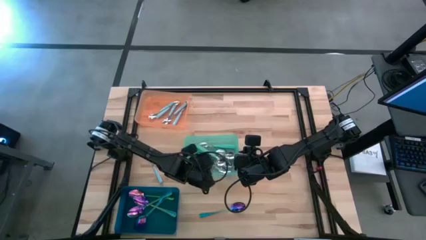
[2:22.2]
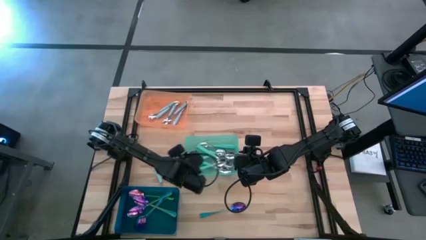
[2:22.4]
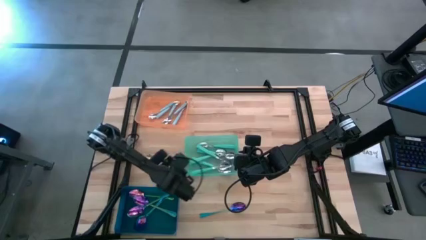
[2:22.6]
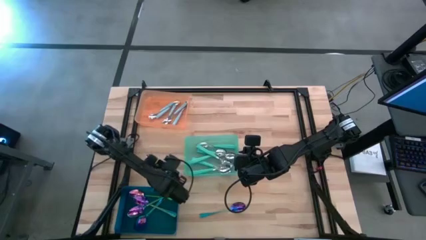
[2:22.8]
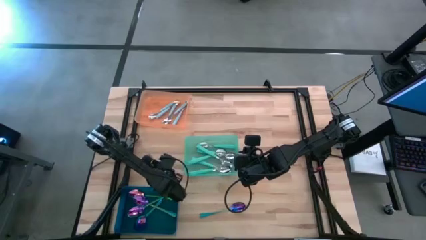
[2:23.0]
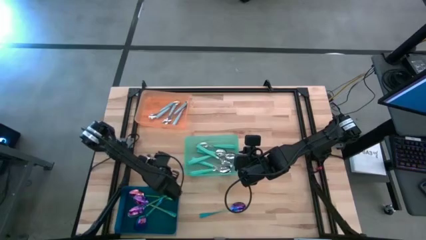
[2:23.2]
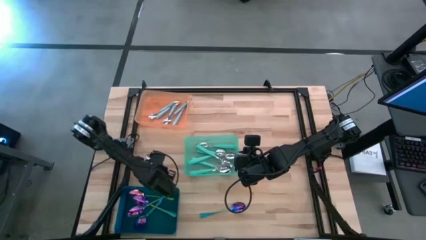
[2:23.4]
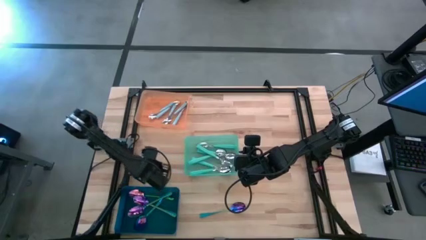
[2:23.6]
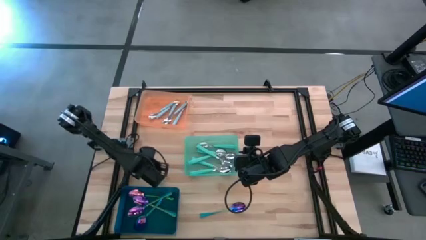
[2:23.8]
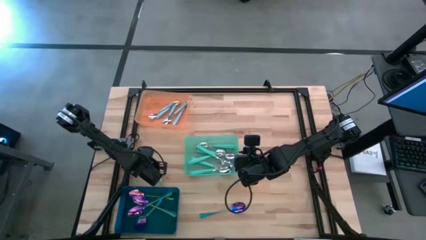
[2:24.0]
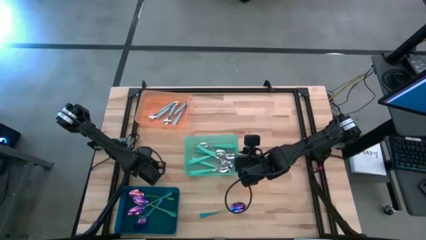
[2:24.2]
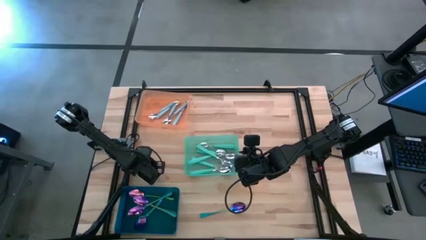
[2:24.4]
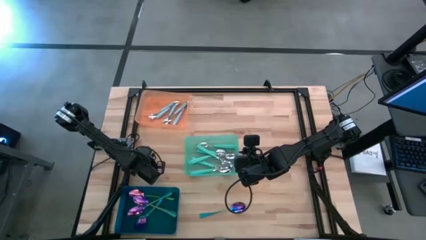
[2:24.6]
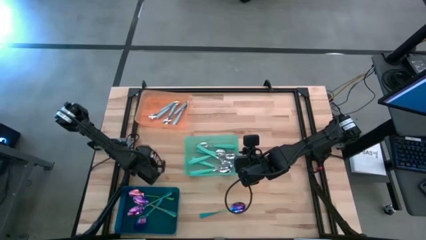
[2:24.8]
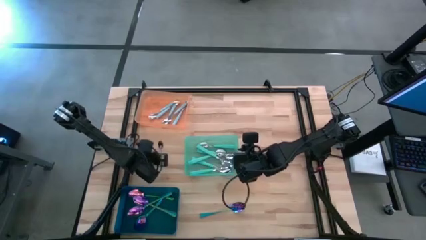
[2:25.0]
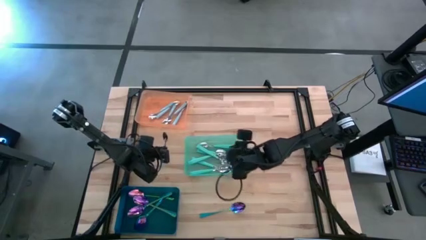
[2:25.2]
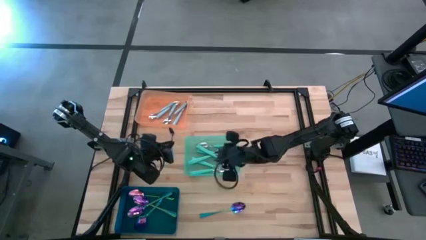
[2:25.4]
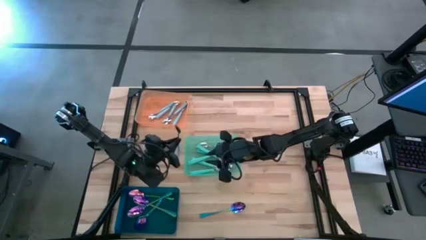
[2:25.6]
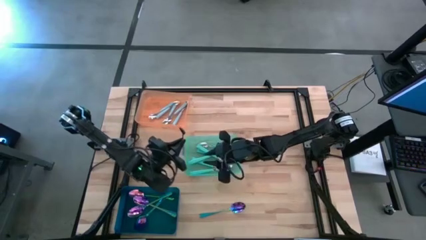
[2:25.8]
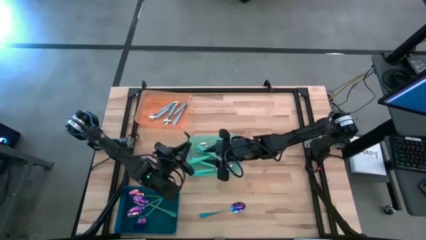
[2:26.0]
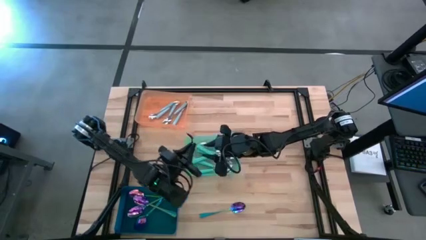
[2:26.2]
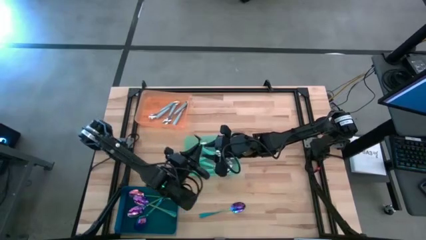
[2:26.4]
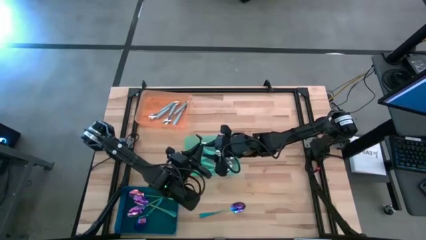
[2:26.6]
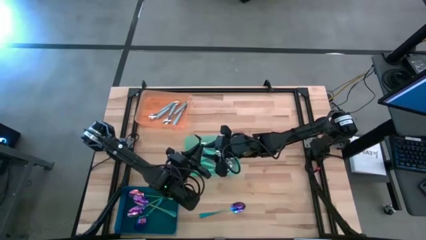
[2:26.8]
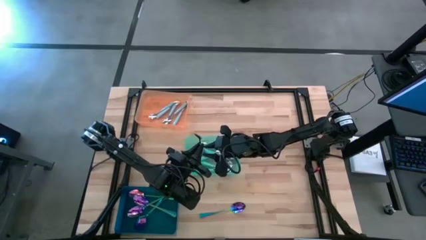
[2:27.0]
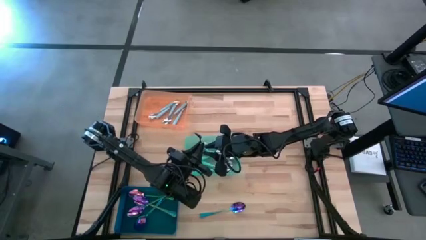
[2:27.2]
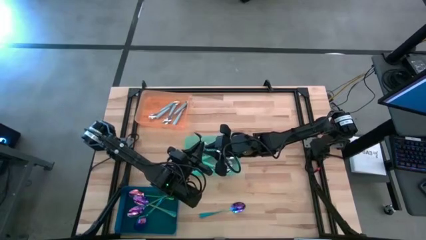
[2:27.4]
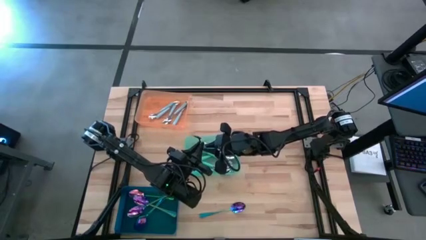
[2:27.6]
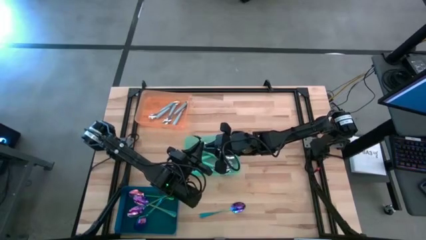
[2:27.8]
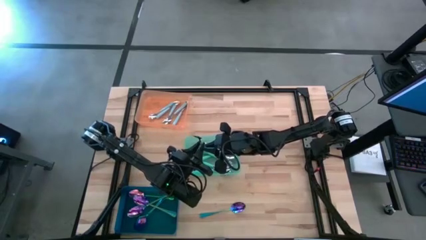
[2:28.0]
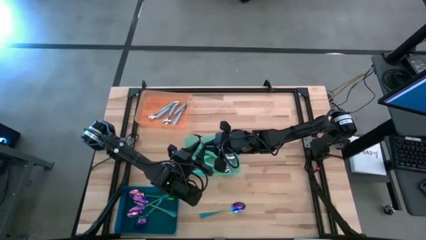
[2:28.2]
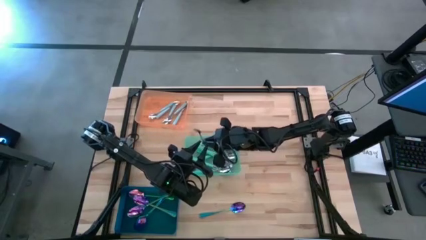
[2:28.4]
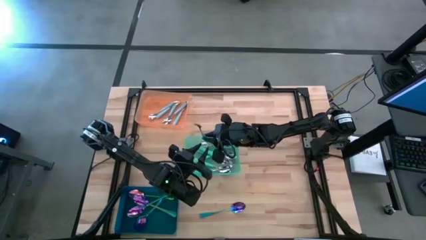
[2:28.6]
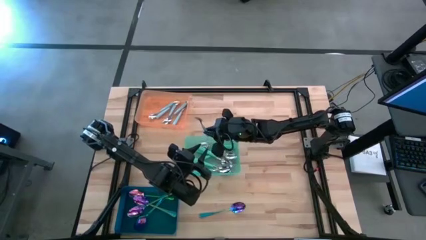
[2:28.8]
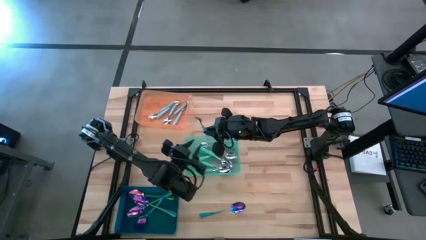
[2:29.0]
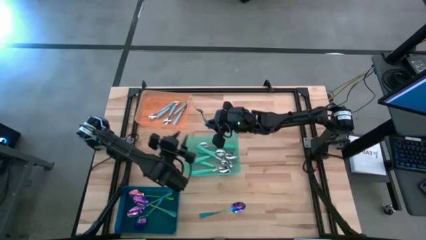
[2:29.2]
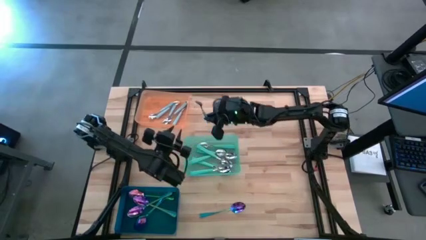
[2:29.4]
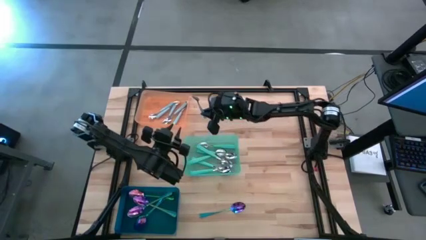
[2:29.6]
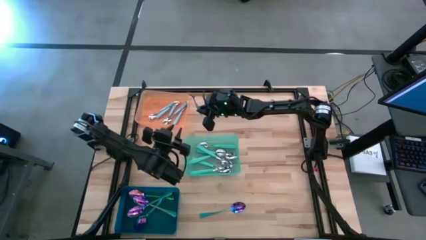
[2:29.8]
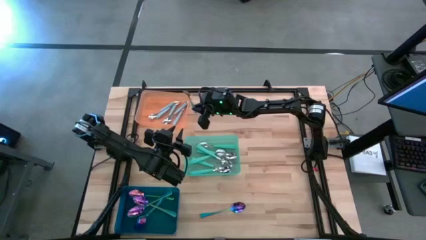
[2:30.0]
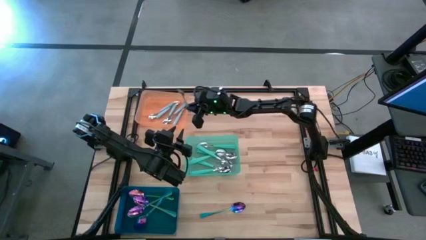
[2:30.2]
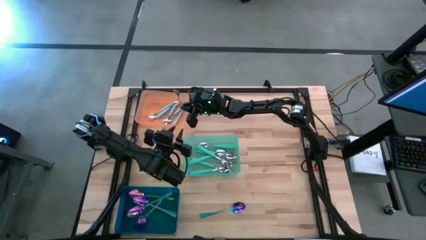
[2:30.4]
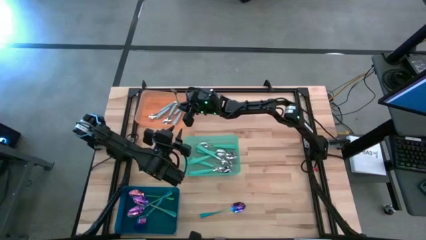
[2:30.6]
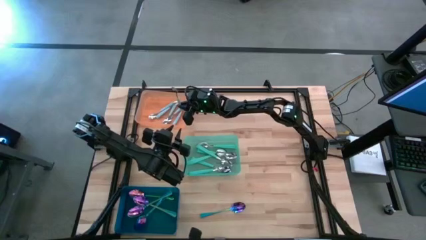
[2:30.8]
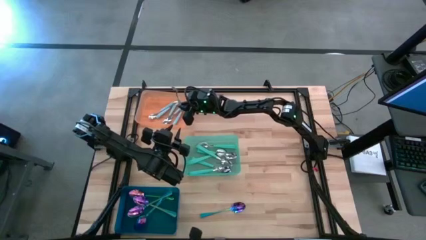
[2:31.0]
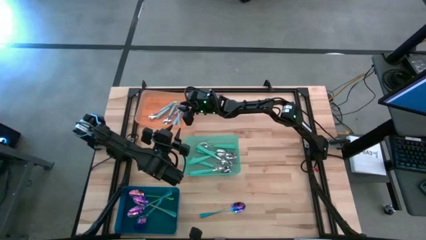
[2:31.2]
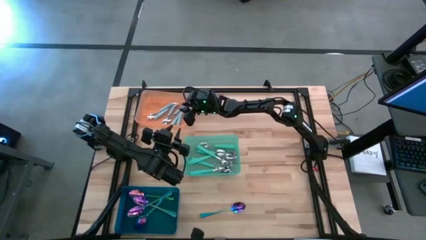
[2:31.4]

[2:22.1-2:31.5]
Task: Sort silverware by color (type)
Put the blue spoon into the orange bin

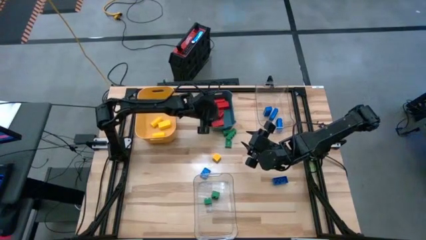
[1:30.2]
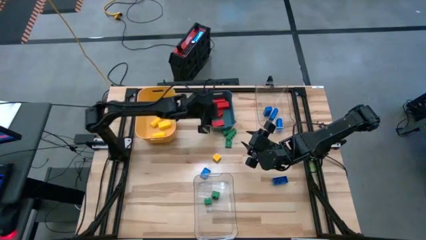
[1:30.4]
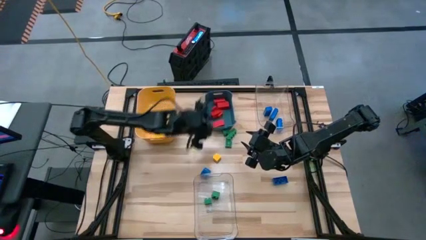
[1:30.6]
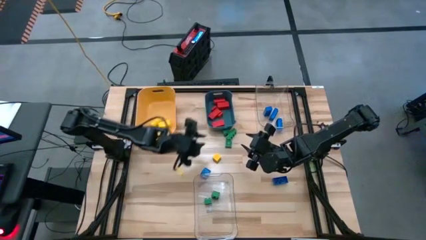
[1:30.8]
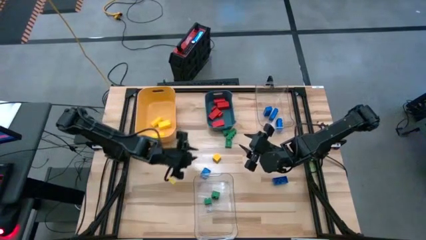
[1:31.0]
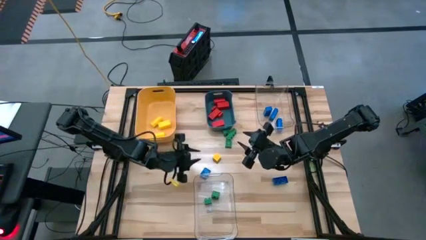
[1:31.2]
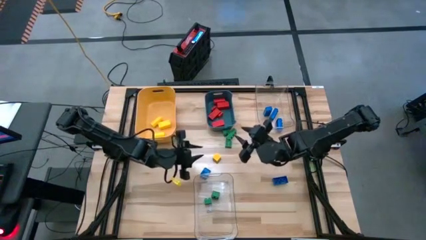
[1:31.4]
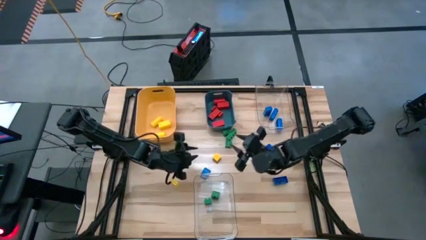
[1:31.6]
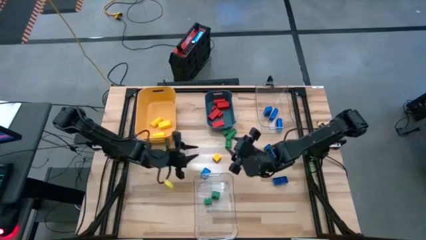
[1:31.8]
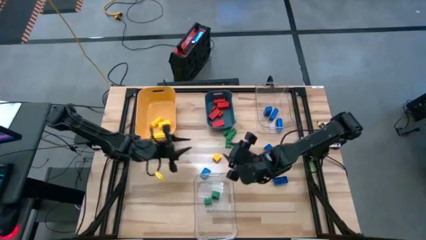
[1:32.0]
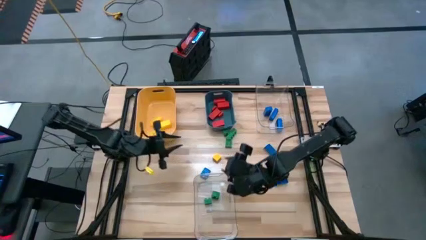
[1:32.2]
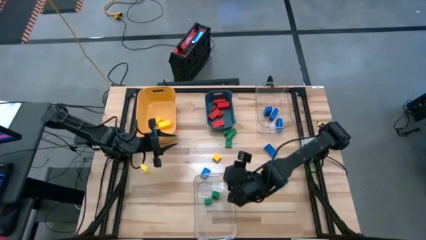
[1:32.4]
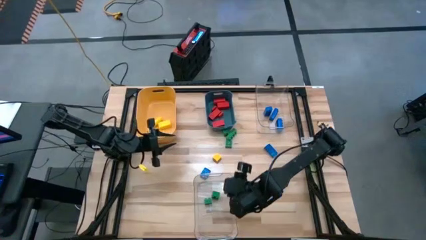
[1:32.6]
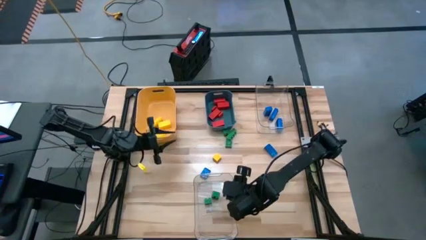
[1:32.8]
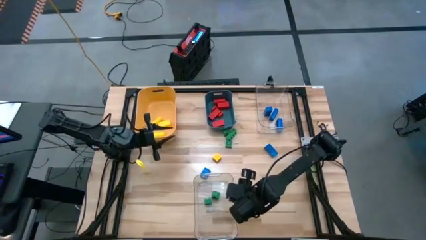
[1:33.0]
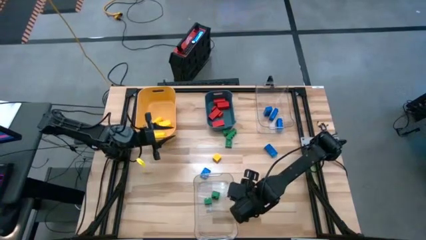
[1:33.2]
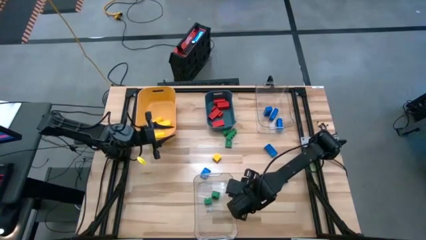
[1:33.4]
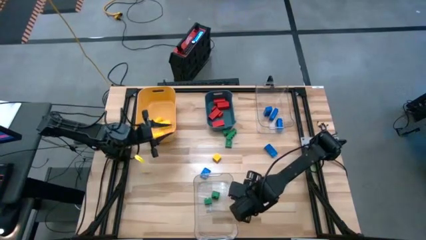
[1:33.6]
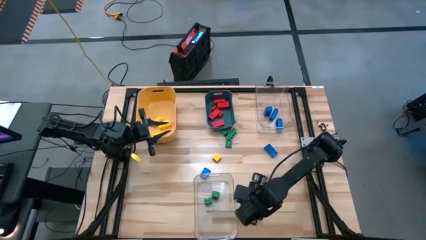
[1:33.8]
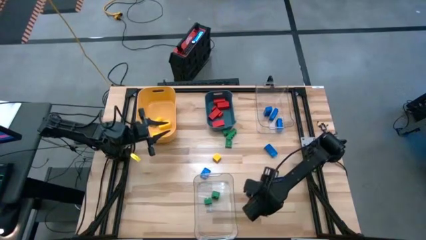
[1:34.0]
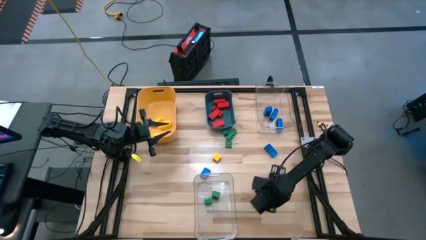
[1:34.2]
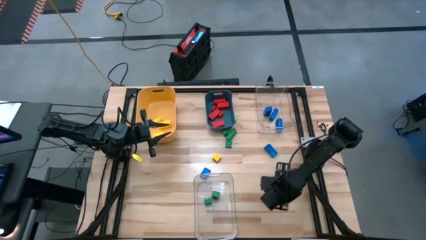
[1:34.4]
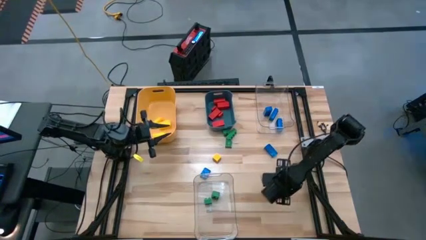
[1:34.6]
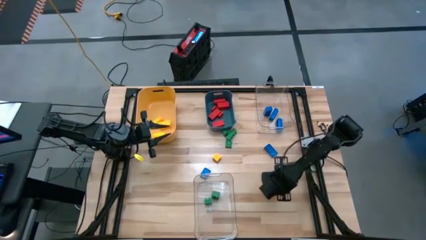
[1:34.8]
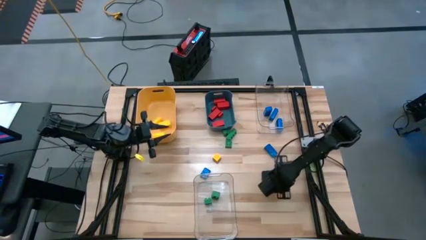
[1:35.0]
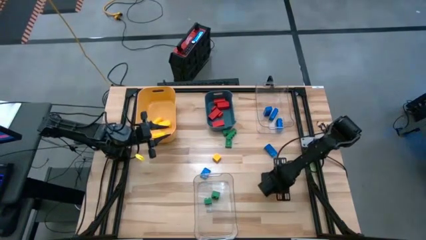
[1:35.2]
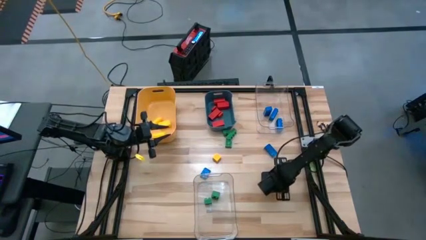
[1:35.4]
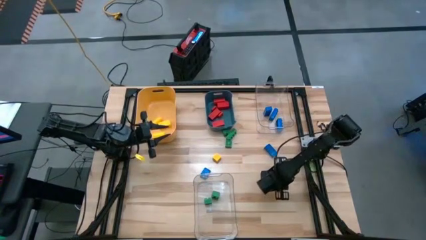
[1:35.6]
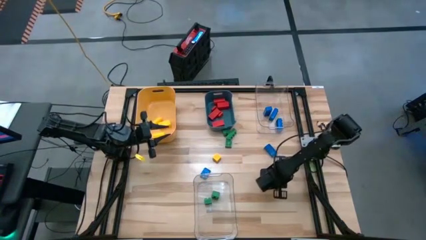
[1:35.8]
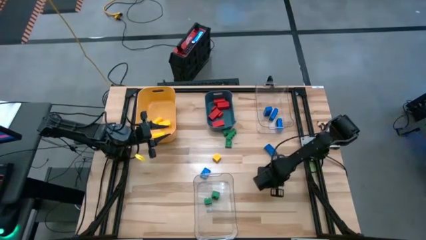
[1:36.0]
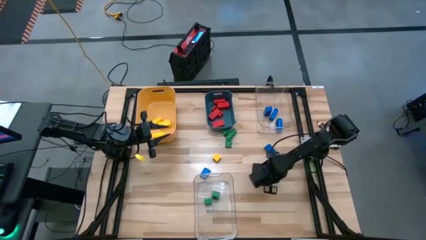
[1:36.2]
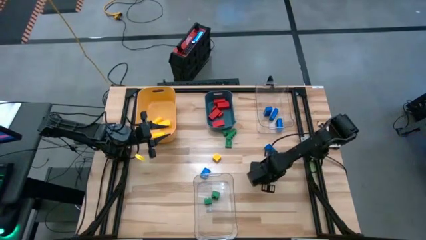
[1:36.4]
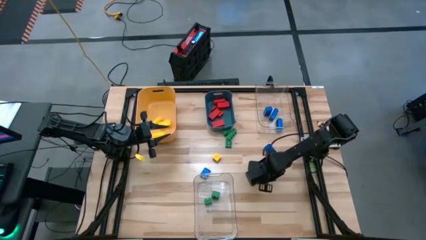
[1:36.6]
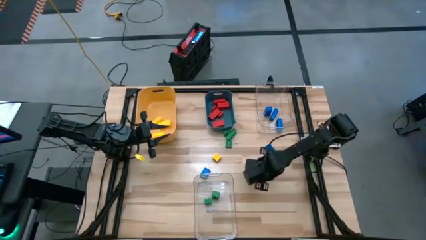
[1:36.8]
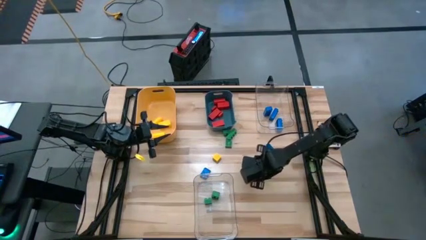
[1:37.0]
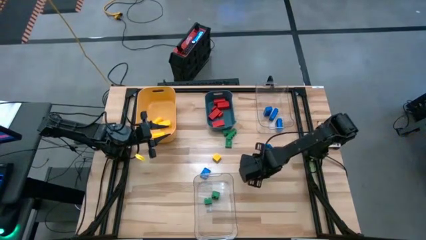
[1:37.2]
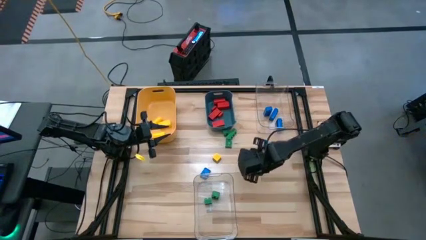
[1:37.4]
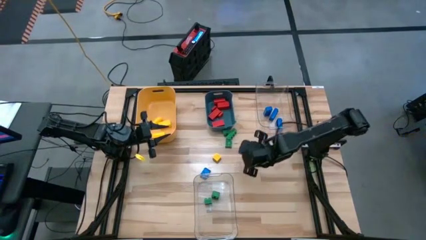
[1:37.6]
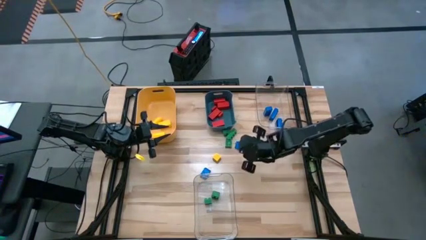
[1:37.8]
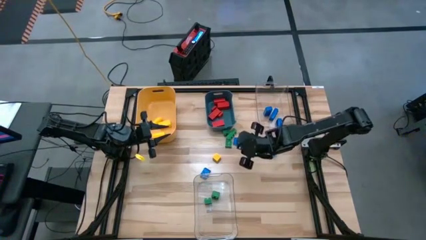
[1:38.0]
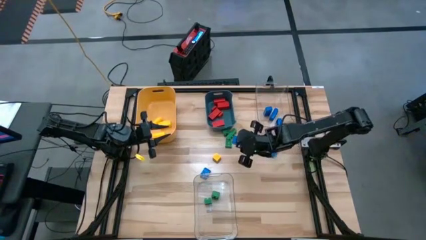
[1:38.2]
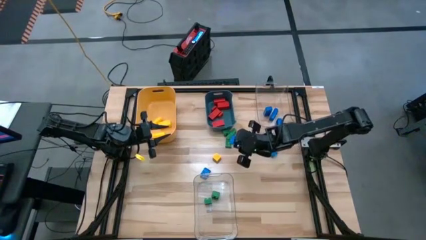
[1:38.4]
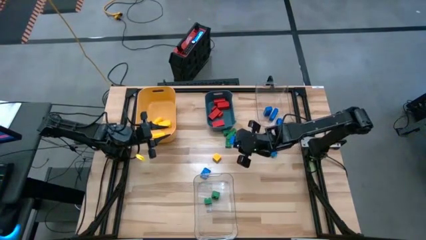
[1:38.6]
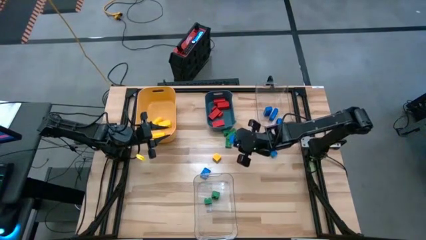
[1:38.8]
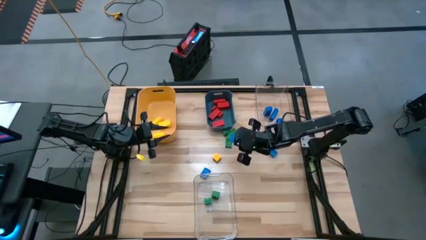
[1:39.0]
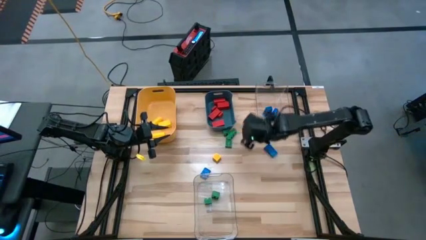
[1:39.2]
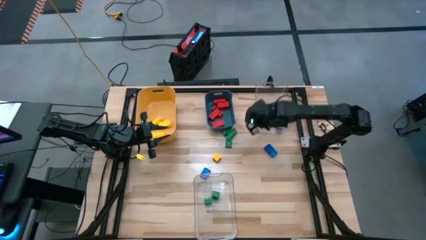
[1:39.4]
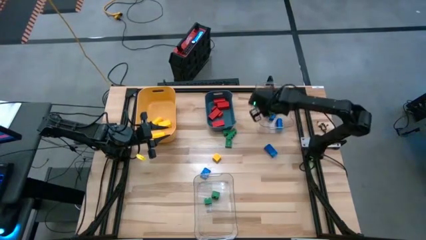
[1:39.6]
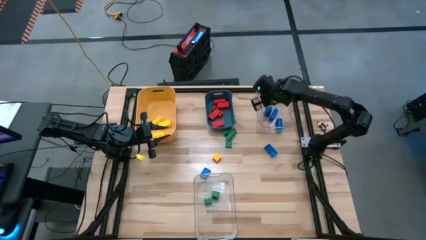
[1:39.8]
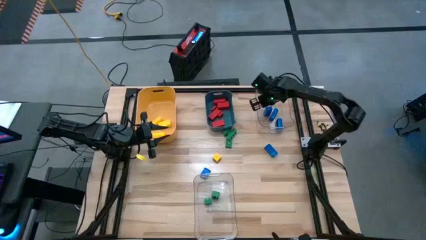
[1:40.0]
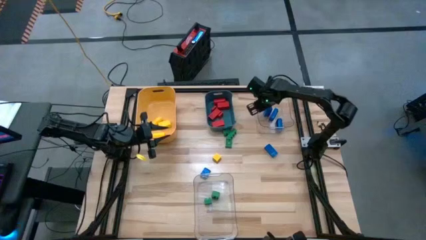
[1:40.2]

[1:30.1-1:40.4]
Task: Sort blocks
Put the blue game piece into the top transparent bin
